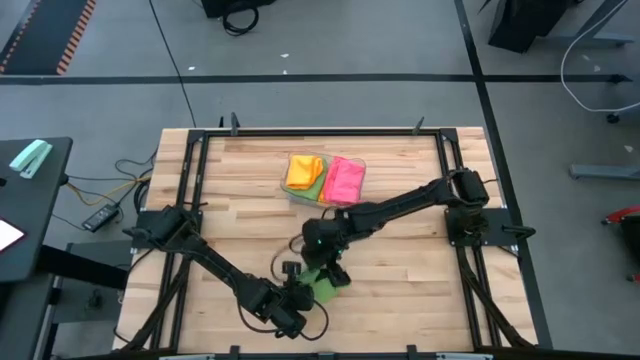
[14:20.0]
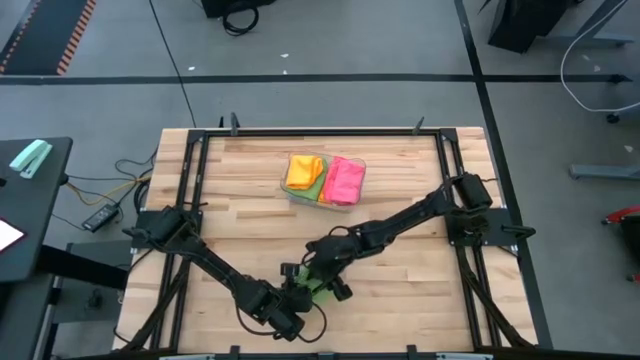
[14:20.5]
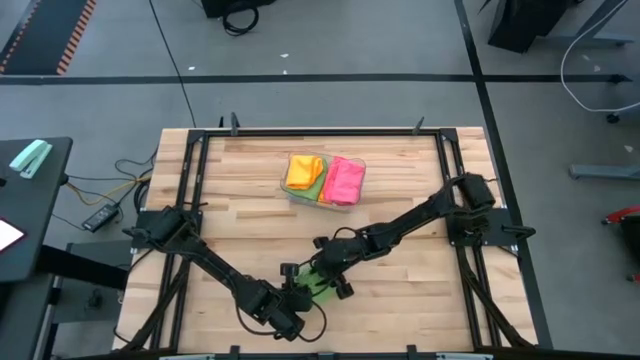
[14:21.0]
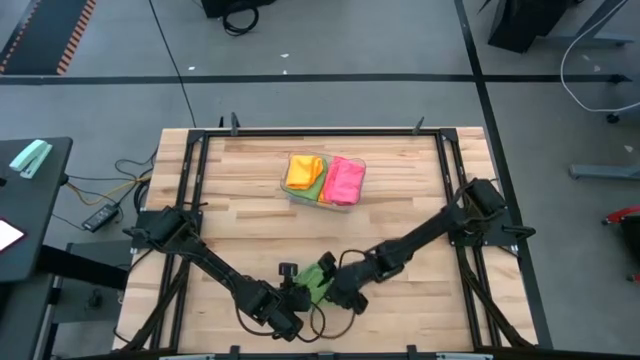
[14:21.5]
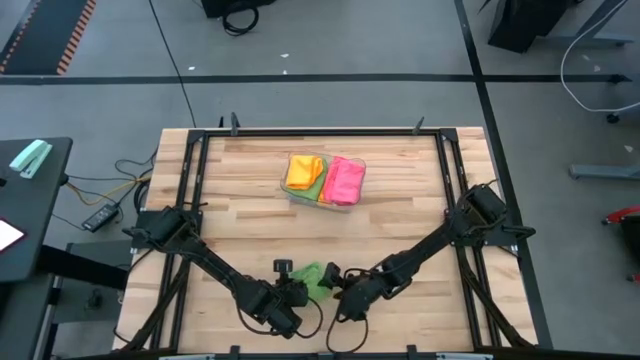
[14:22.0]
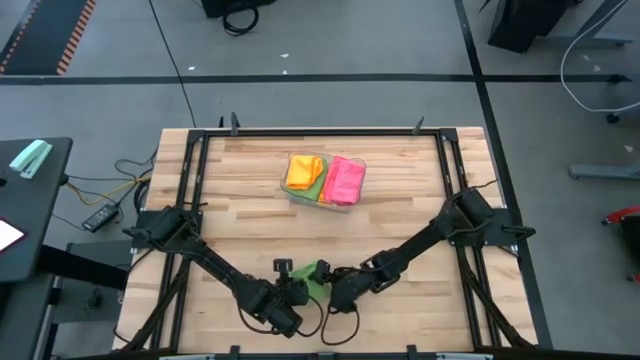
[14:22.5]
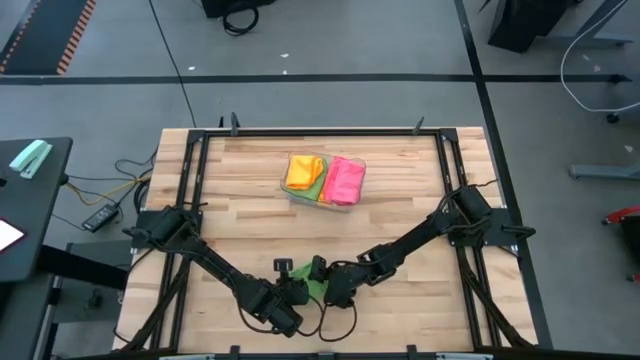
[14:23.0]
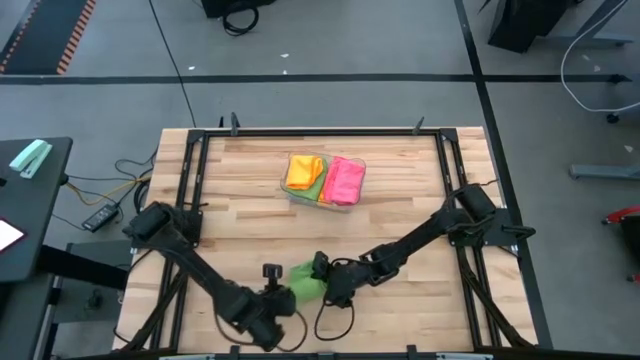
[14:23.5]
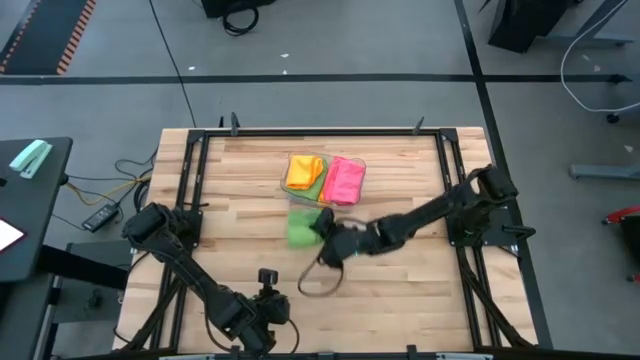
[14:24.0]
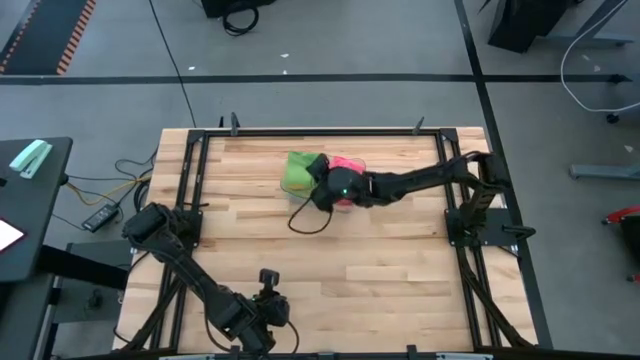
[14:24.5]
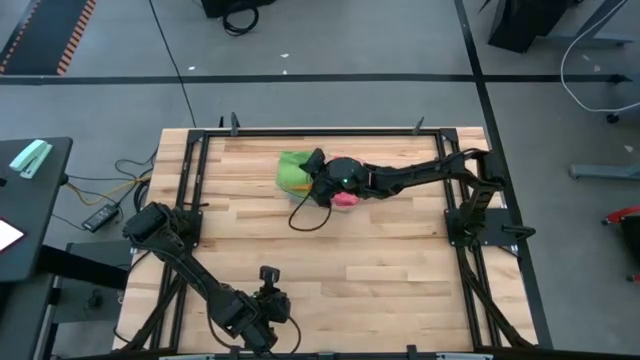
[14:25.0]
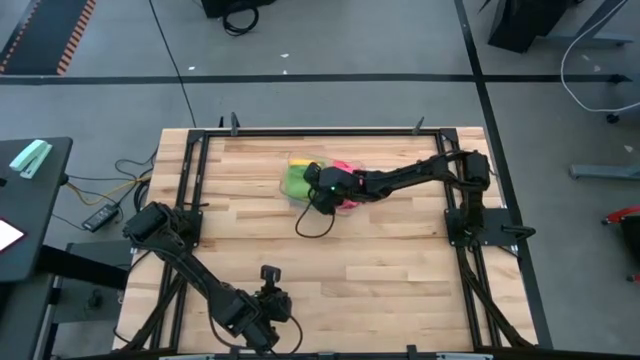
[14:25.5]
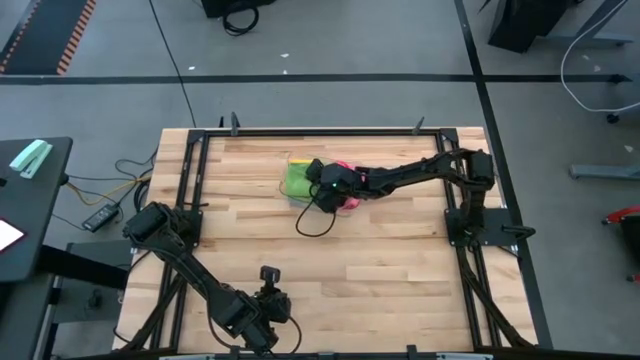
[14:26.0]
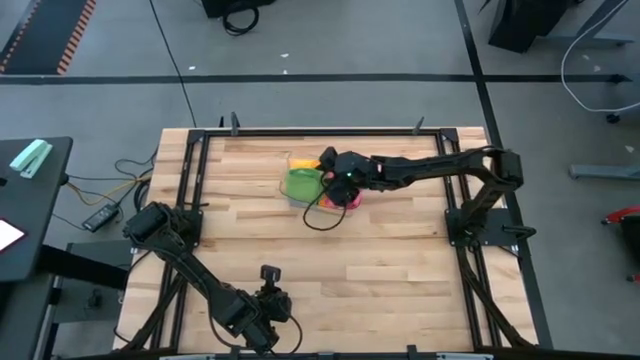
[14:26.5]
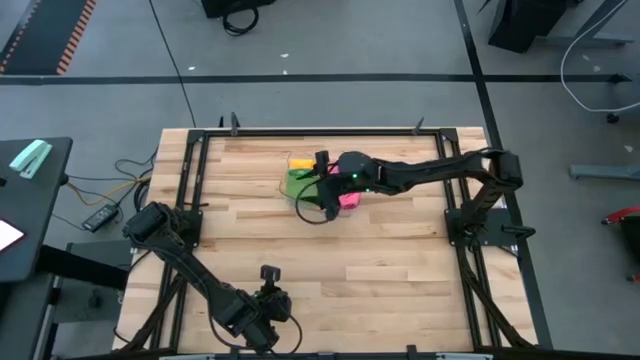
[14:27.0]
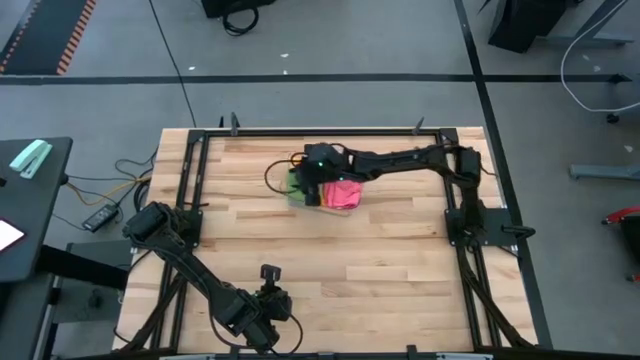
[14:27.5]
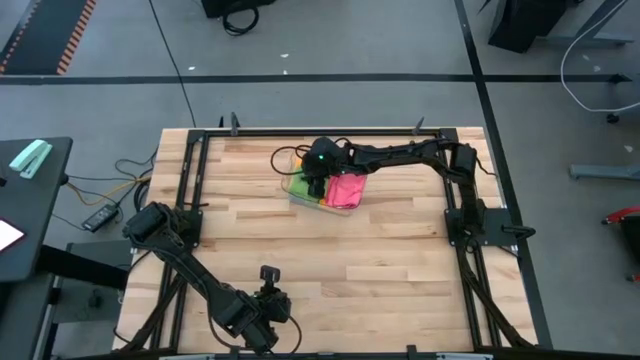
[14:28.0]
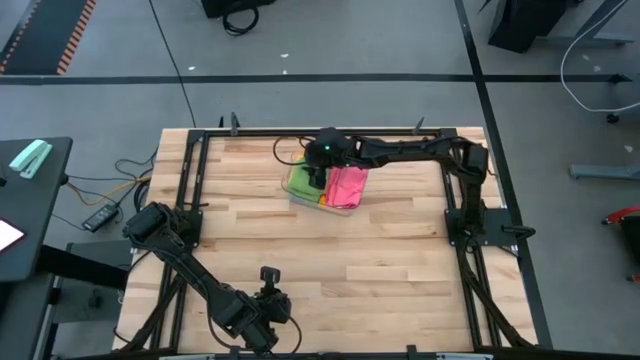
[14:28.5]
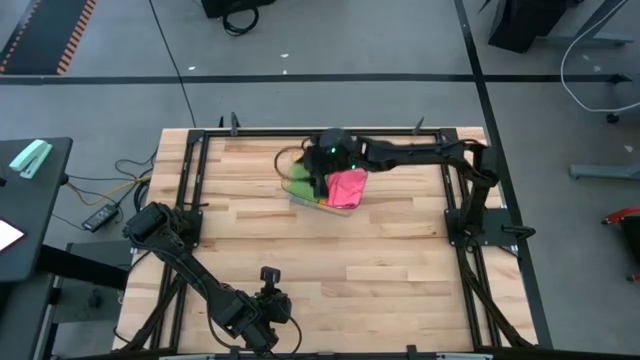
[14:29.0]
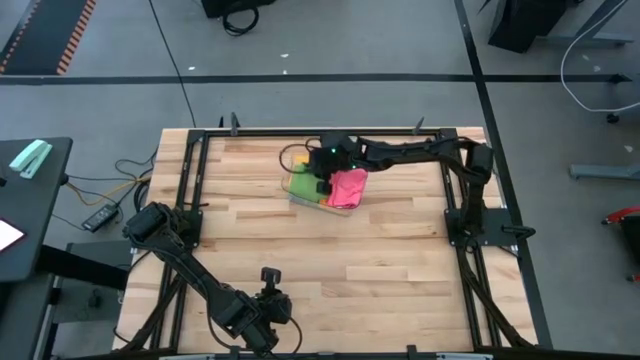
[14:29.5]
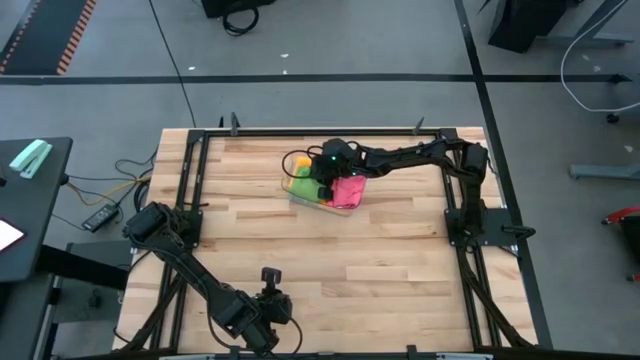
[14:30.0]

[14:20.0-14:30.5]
Task: Fold microfiber towels
Put the folded green microfiber cloth into the transparent bin

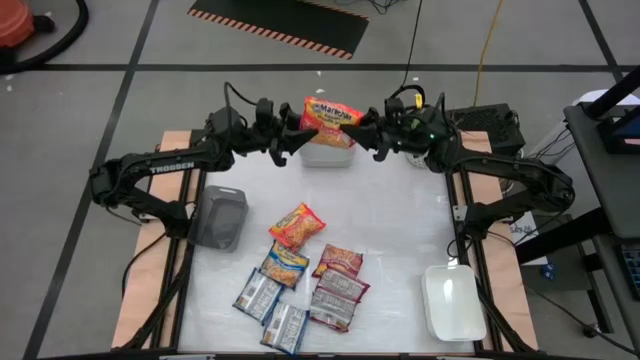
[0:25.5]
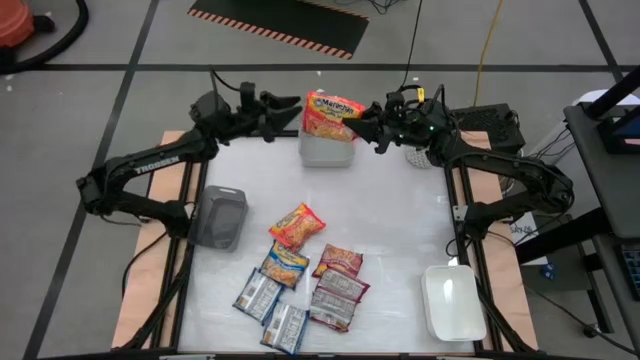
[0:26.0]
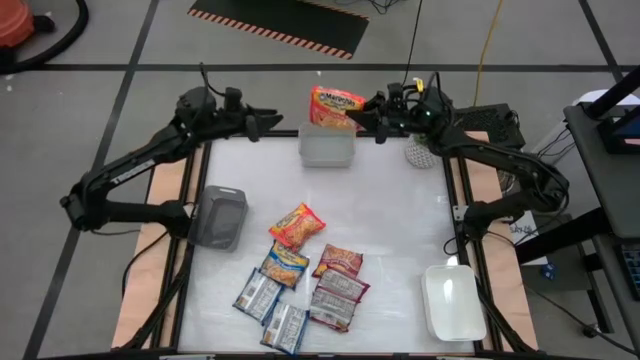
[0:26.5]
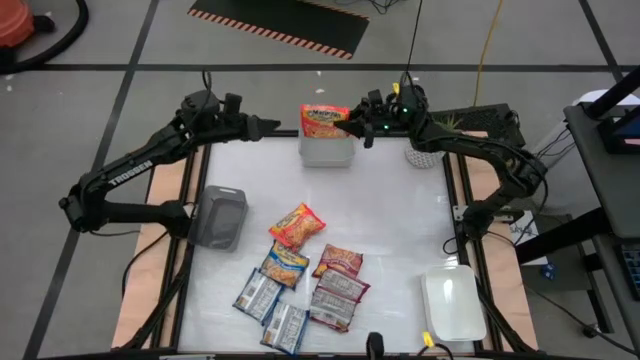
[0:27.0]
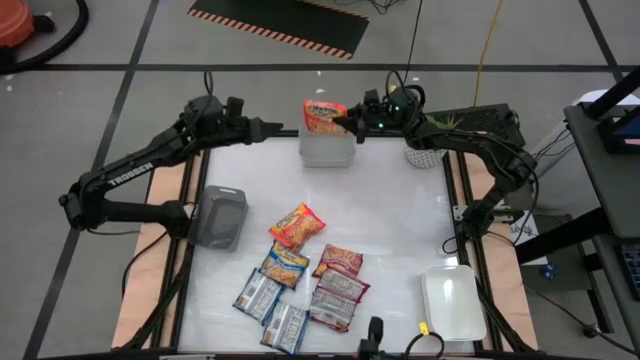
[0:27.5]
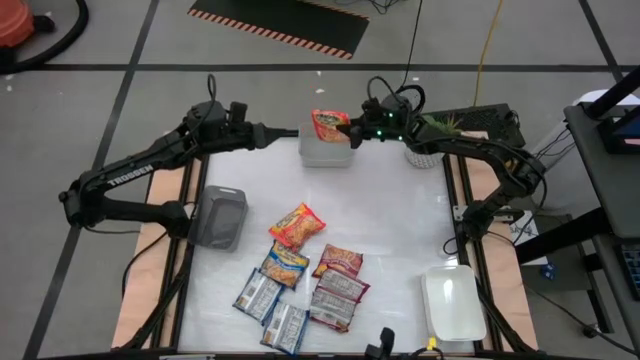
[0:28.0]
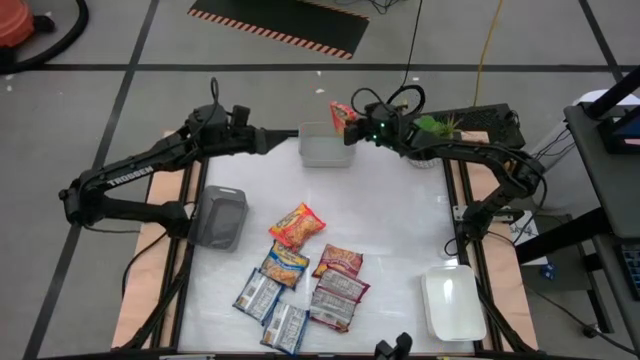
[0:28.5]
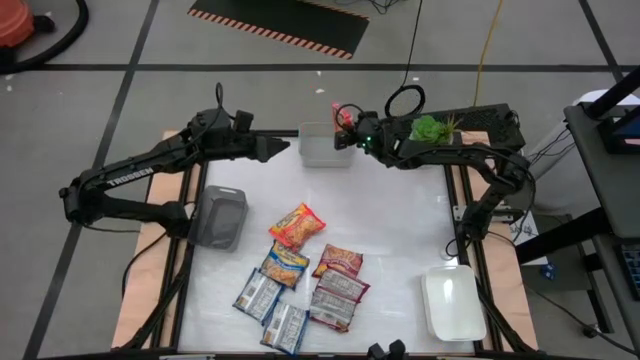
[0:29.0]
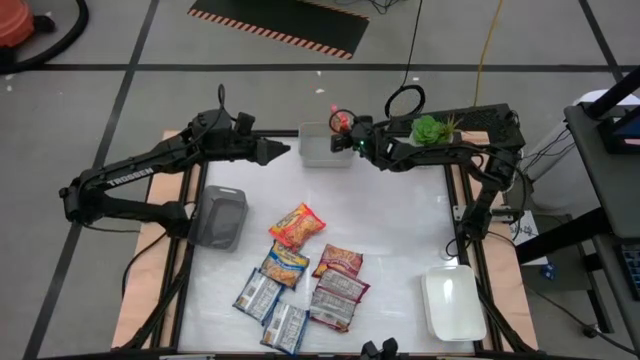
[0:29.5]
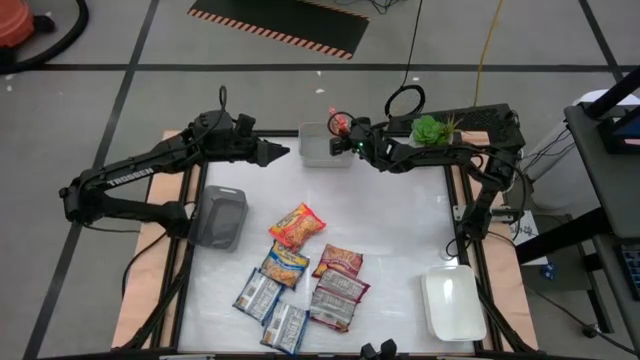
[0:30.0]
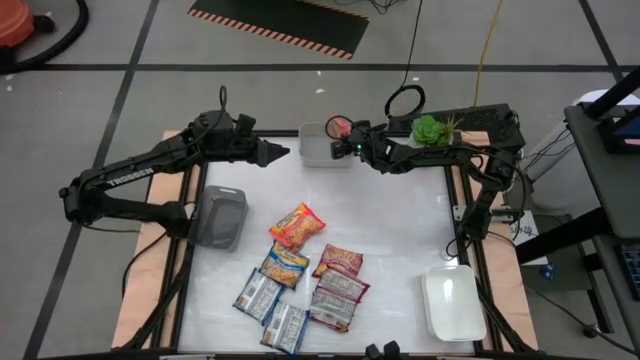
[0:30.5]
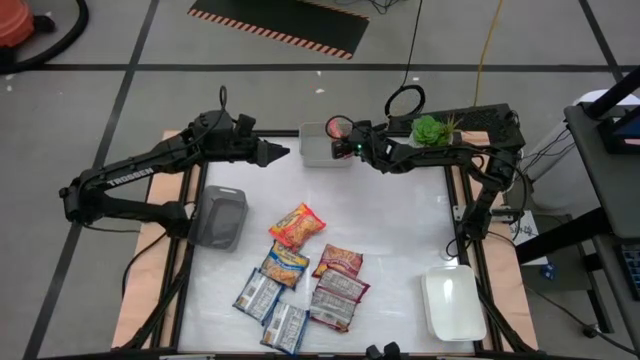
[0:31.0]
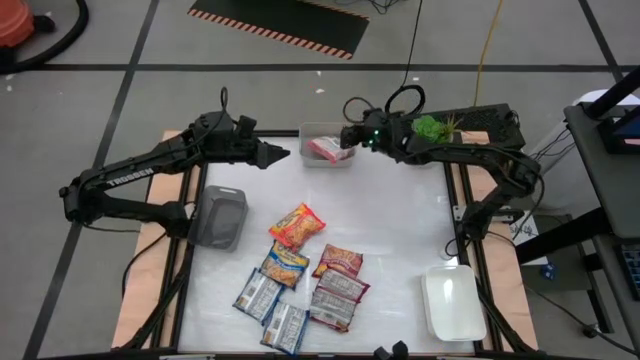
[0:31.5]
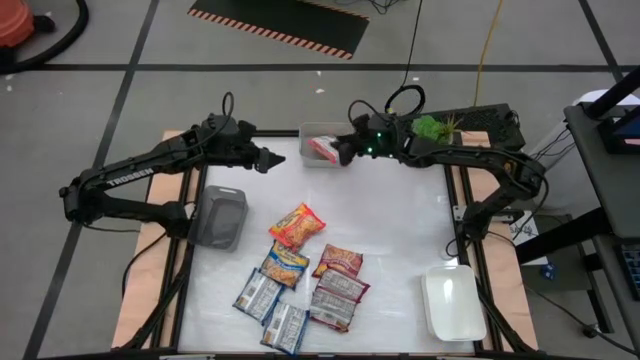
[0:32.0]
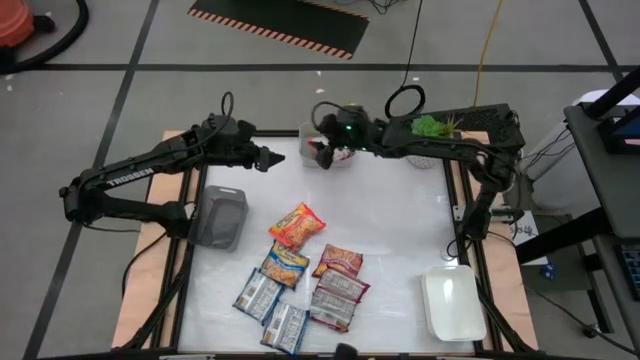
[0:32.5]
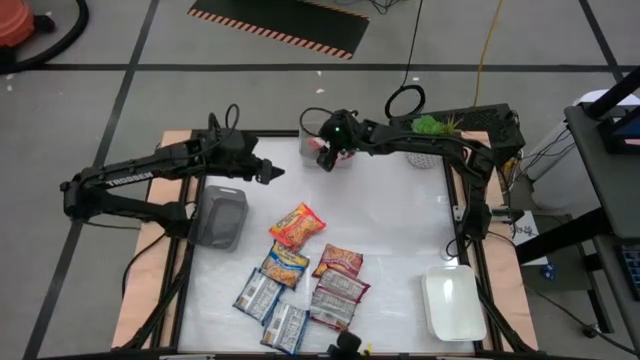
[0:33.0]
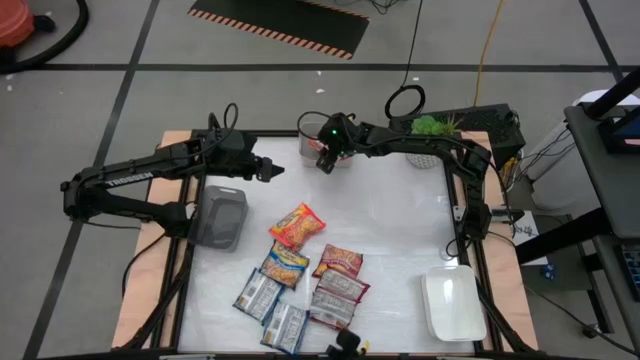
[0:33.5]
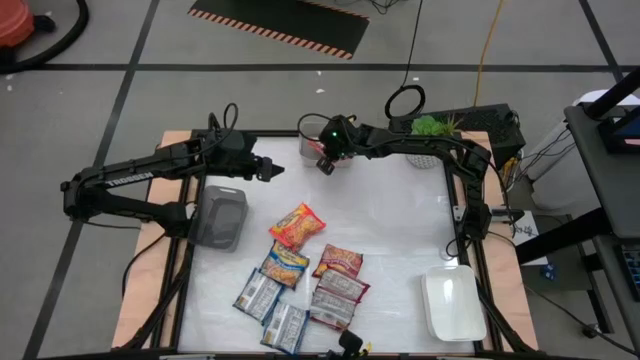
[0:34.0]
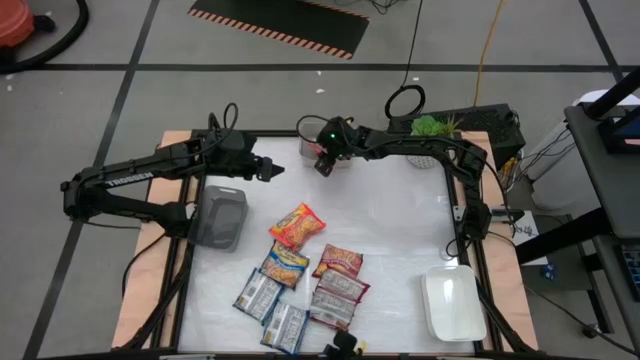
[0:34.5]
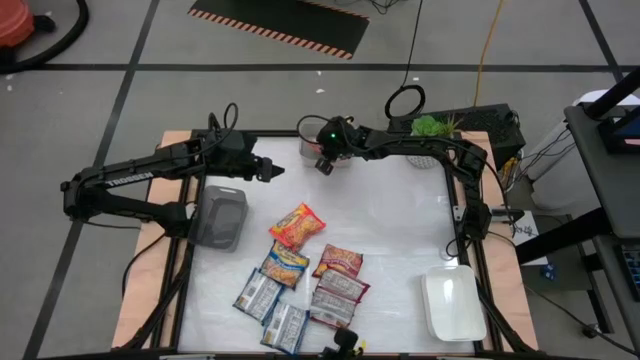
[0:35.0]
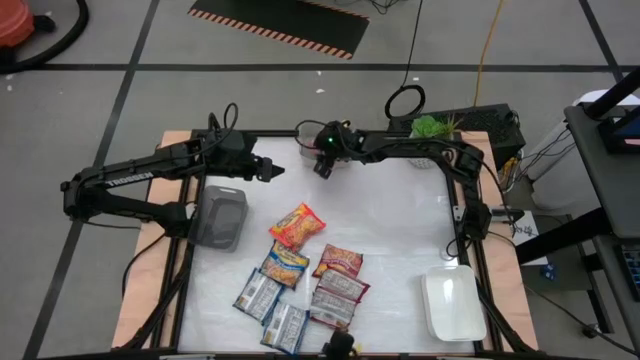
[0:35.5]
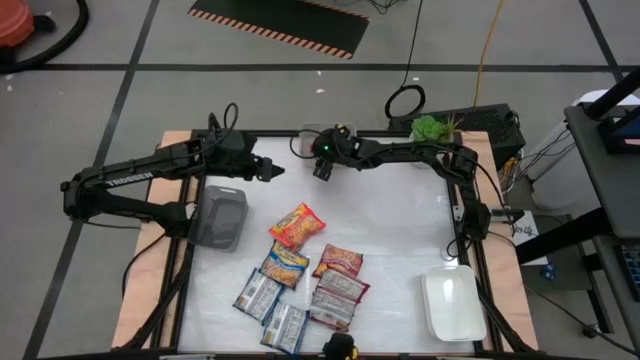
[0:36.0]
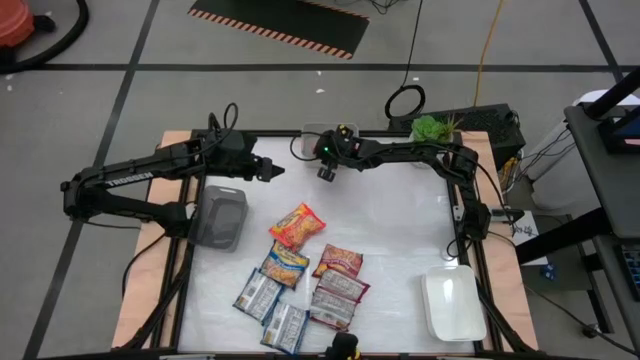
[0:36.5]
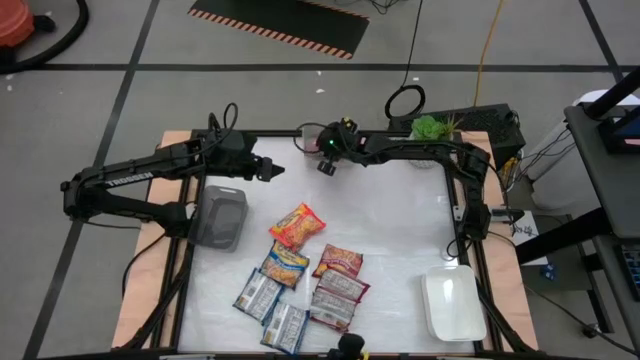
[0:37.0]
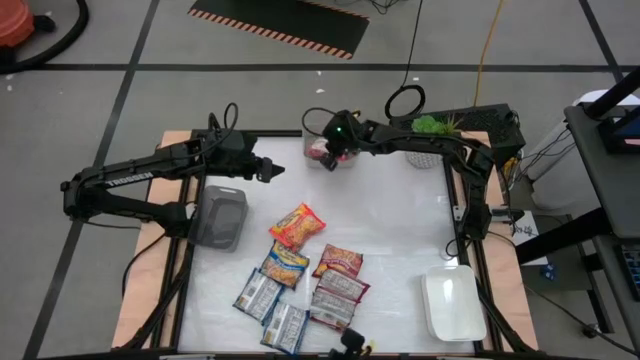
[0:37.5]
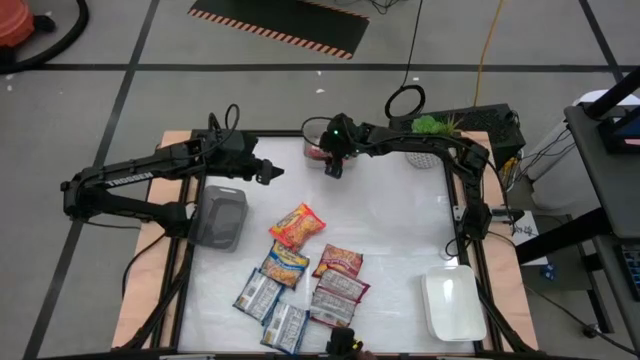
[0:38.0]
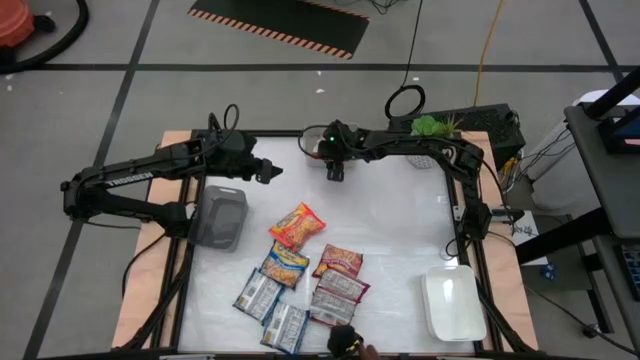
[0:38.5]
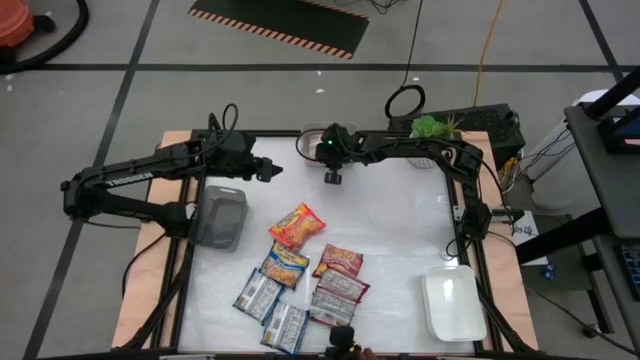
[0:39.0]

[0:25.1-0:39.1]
Task: Sort Maruchan noodles
Put the right orange noodle pack into the gray bin
